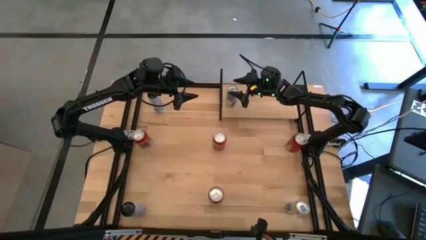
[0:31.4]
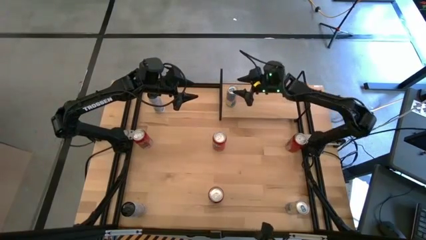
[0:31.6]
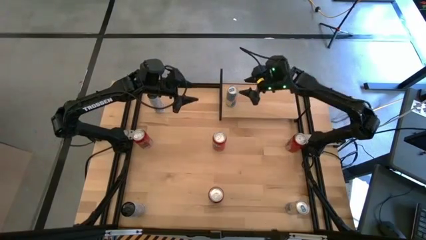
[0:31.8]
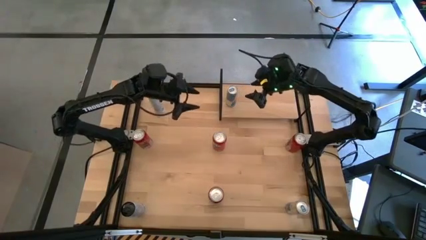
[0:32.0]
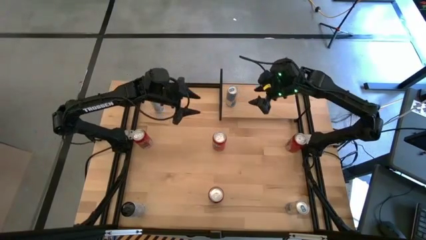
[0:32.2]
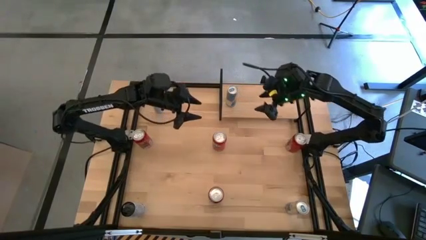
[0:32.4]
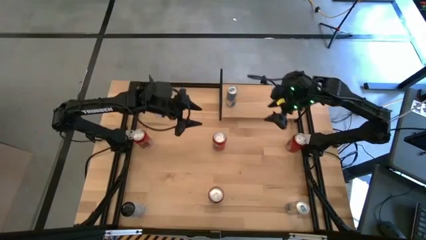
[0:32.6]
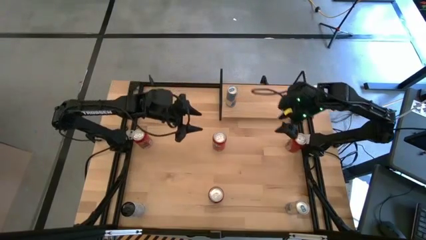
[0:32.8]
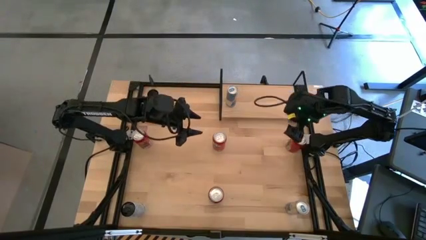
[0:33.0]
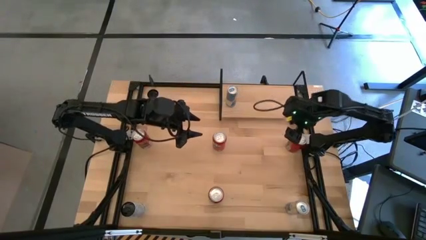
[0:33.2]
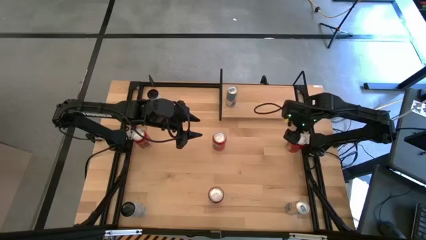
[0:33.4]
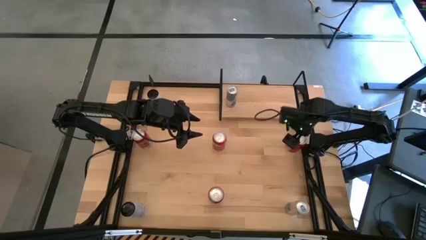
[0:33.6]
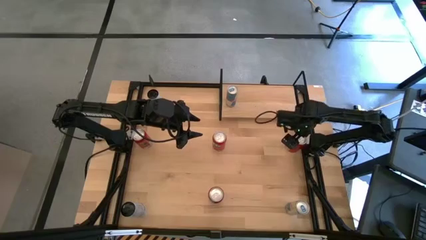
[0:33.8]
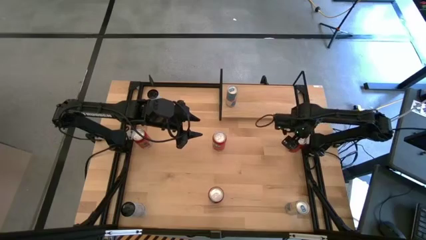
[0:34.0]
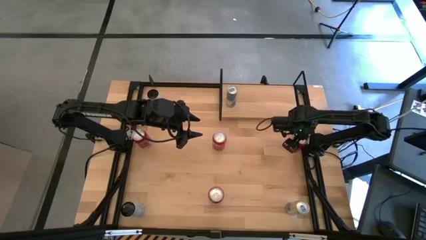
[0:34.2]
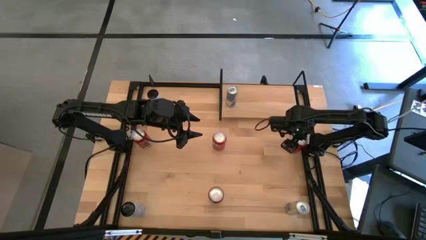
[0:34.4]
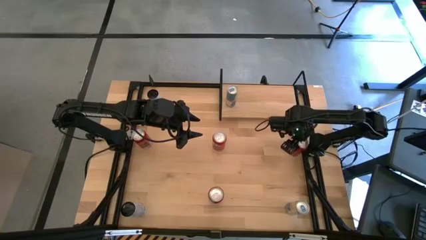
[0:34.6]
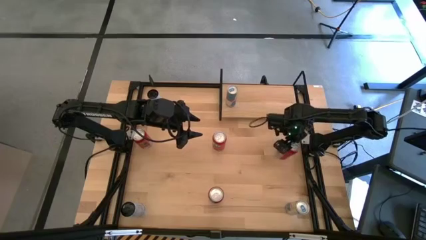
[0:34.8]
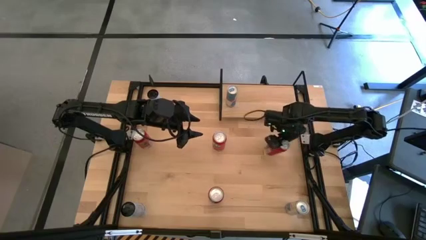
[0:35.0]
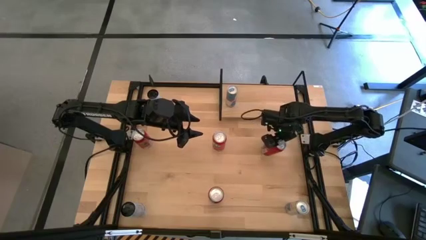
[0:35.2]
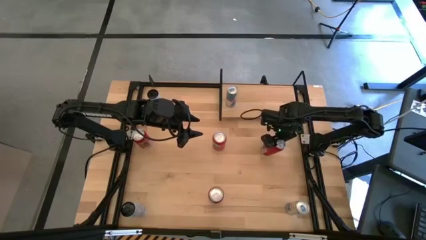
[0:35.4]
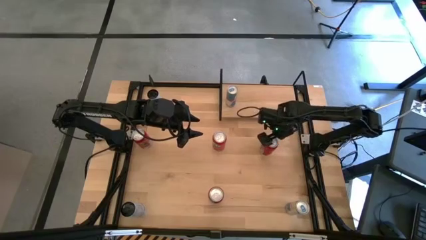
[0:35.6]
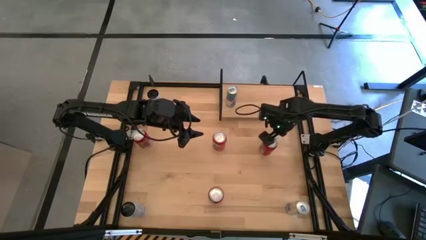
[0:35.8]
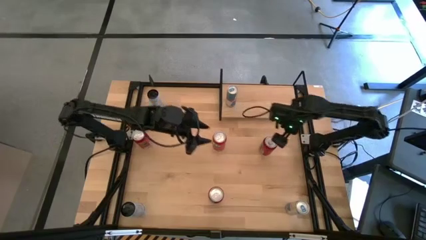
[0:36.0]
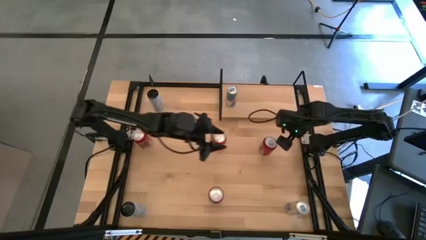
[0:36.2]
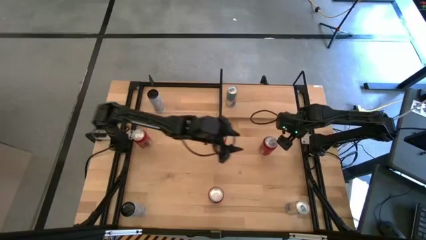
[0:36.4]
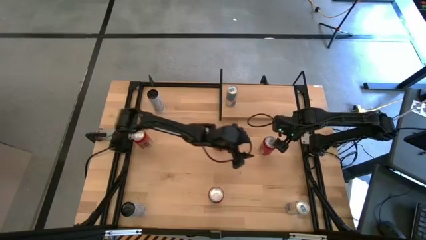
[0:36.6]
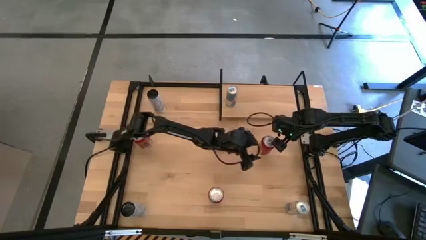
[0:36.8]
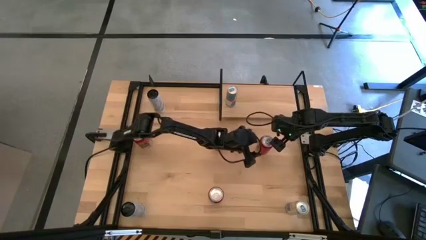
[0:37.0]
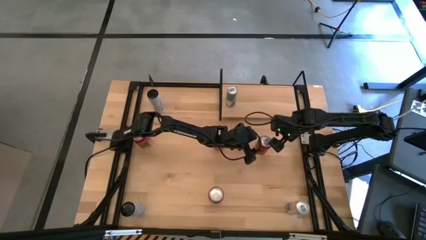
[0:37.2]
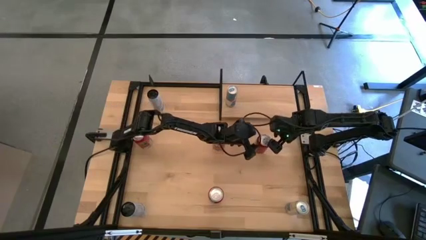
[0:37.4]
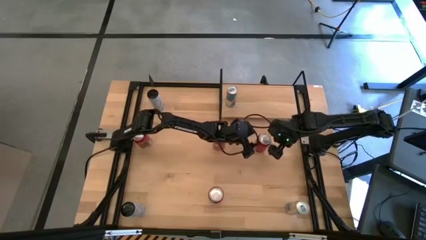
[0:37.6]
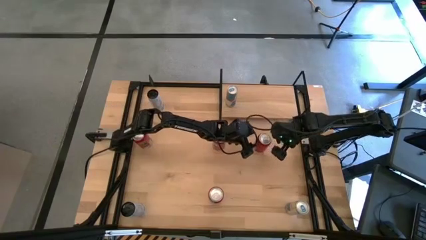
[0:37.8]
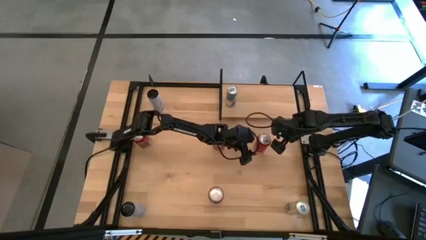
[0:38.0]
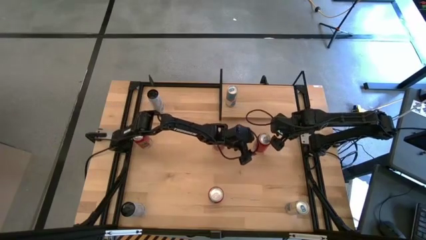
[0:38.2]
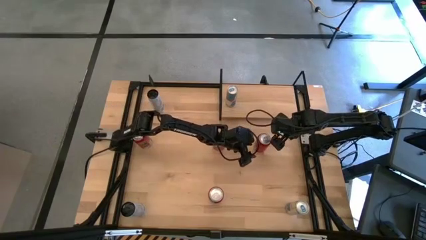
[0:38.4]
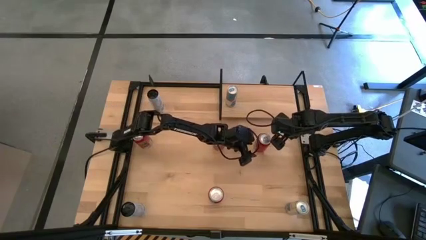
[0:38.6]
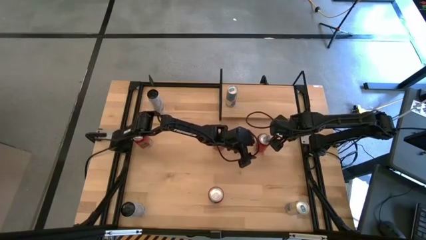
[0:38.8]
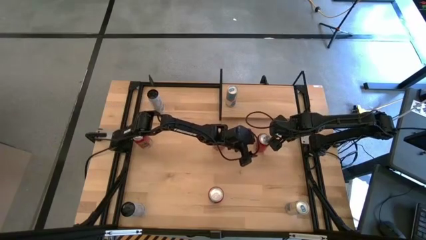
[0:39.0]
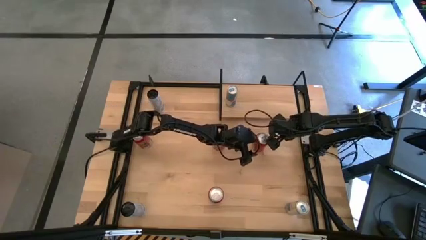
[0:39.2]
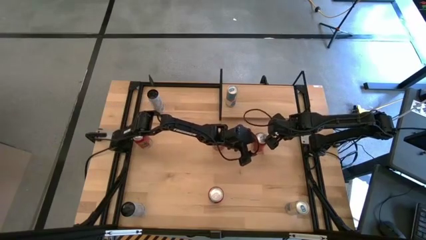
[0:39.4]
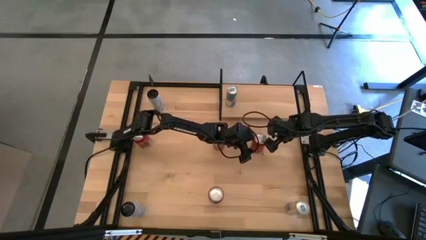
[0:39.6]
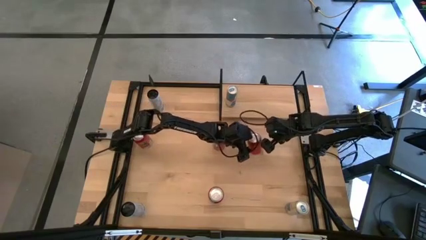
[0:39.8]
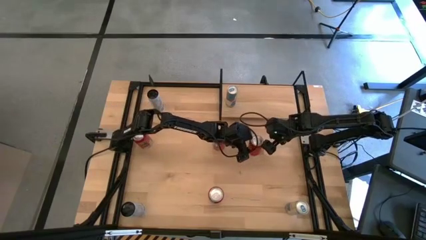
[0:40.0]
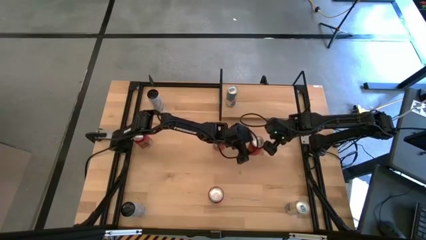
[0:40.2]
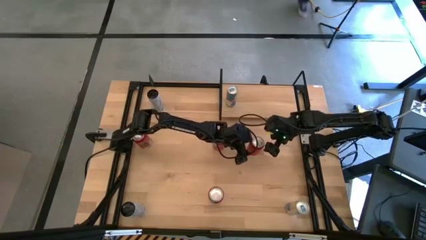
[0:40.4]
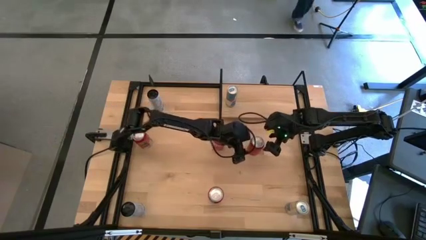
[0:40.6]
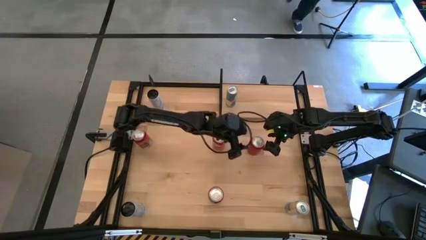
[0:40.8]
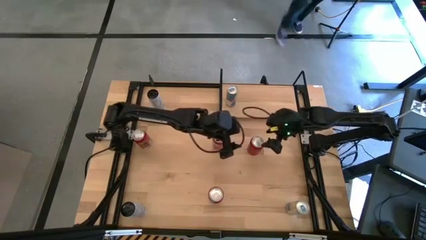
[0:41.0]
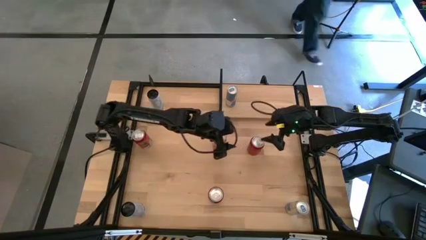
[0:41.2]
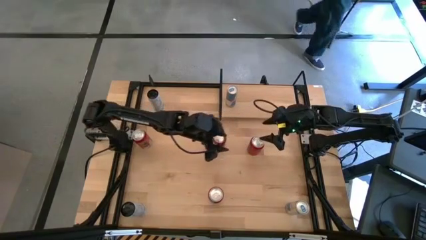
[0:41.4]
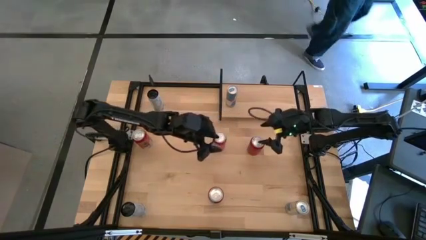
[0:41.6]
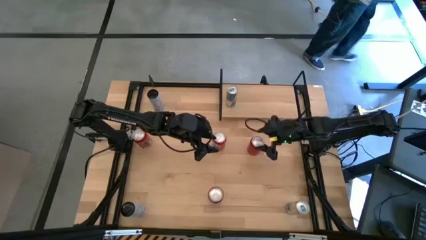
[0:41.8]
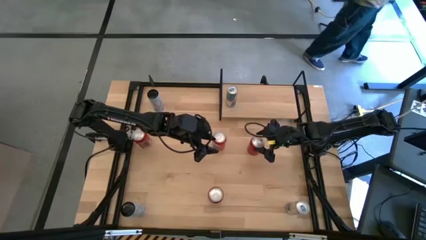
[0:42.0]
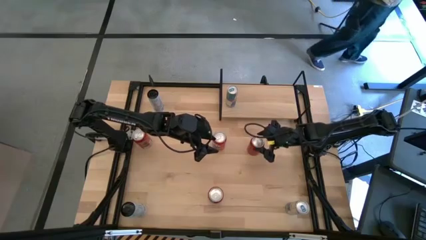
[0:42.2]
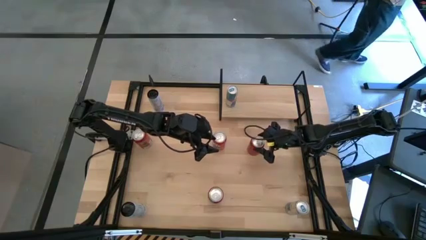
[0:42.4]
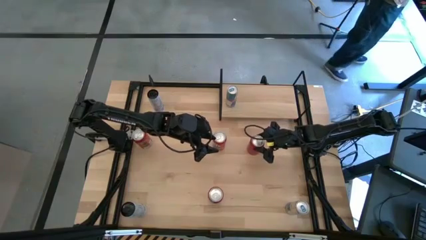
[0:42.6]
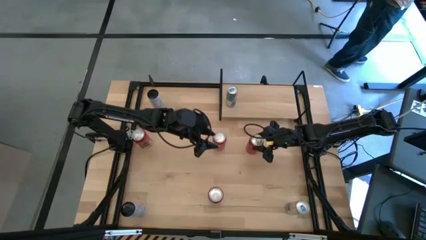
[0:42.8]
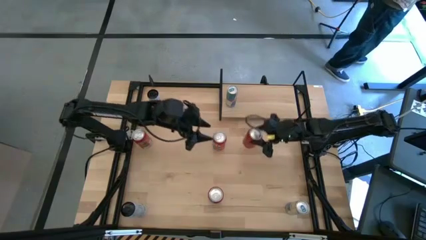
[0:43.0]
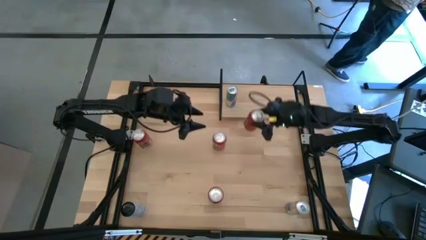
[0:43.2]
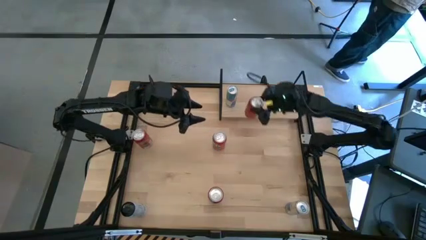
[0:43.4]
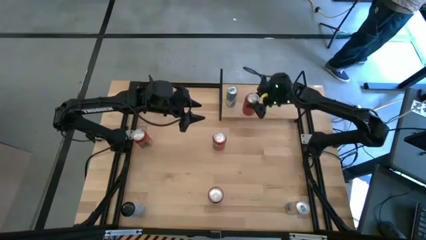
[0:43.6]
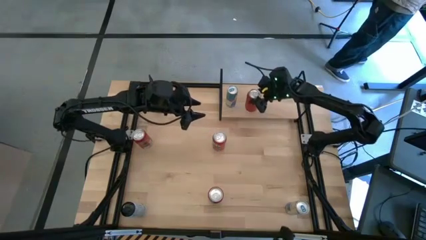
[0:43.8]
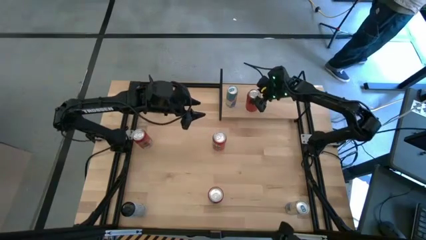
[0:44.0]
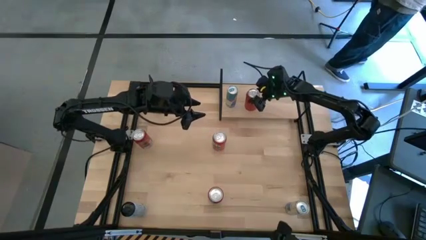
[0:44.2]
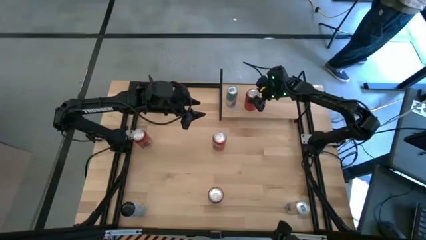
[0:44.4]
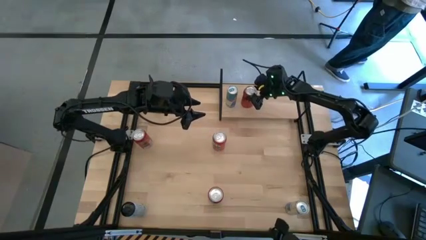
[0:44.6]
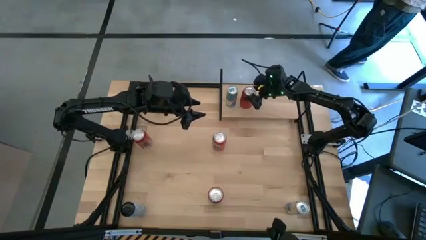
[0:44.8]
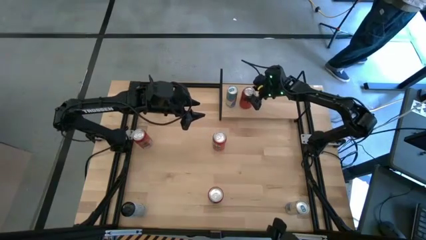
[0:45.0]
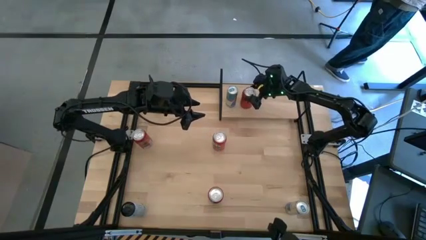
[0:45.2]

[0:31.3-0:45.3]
Task: Place canned beverage on shelf
Put the right red-black soda can on the shelf
